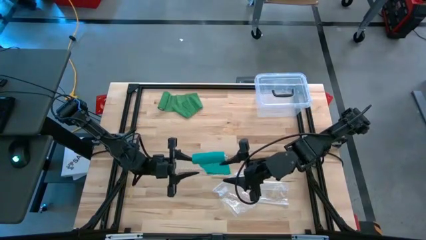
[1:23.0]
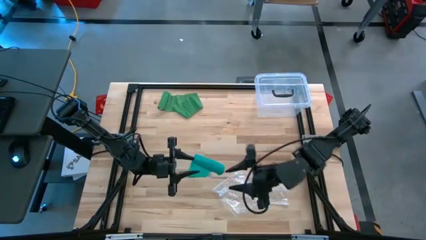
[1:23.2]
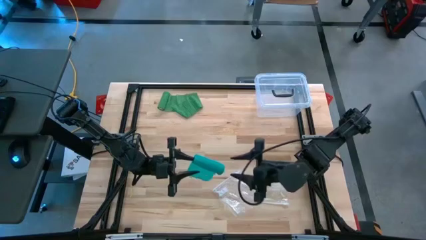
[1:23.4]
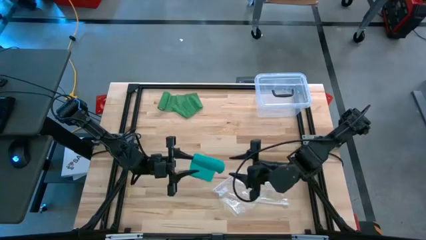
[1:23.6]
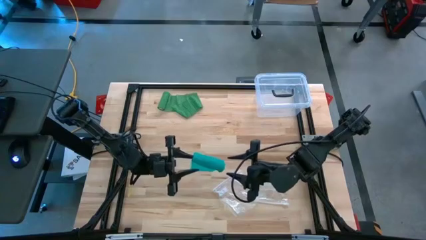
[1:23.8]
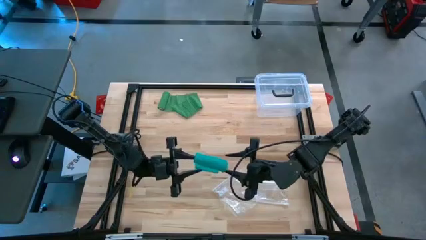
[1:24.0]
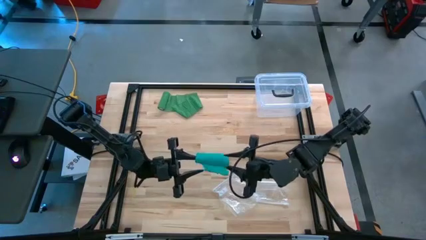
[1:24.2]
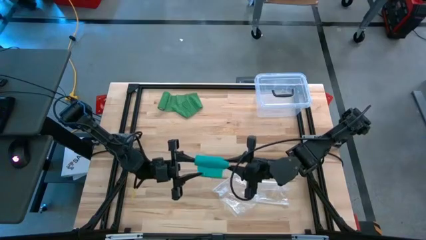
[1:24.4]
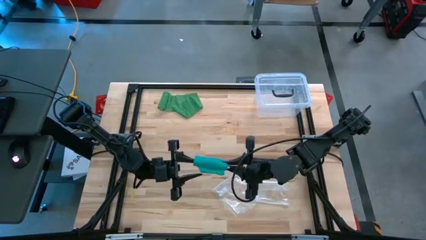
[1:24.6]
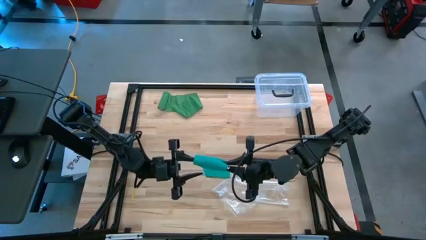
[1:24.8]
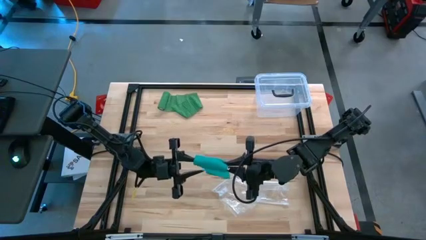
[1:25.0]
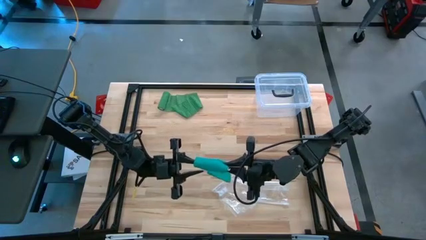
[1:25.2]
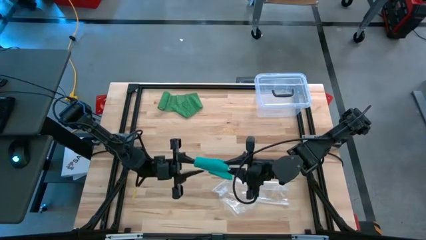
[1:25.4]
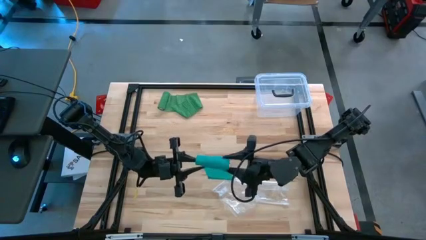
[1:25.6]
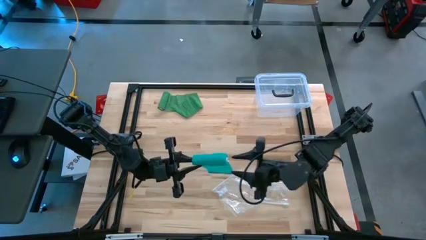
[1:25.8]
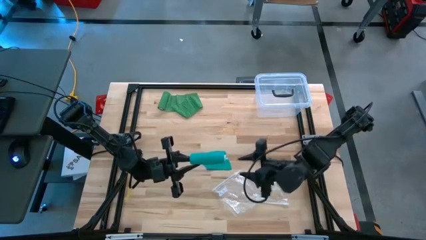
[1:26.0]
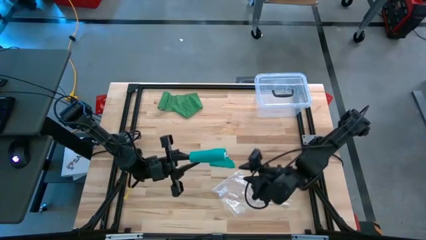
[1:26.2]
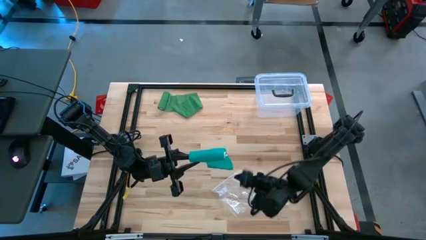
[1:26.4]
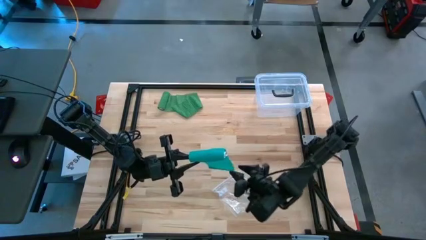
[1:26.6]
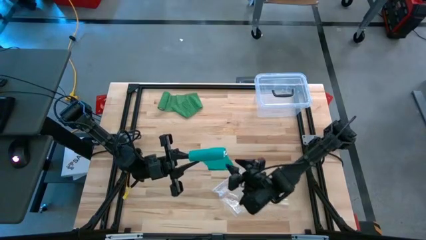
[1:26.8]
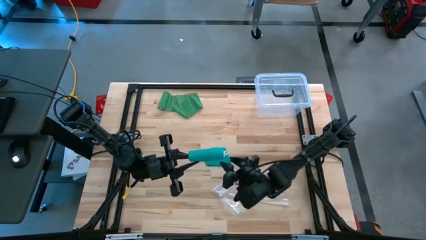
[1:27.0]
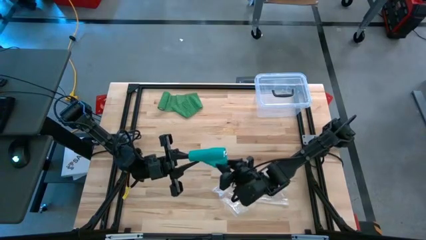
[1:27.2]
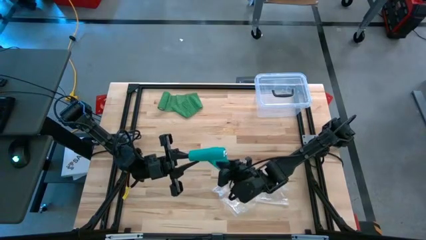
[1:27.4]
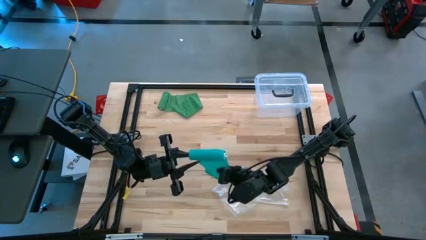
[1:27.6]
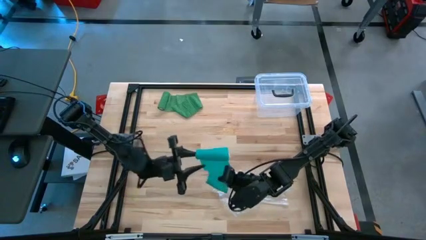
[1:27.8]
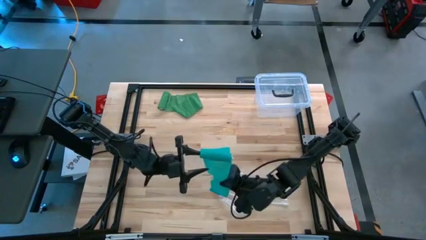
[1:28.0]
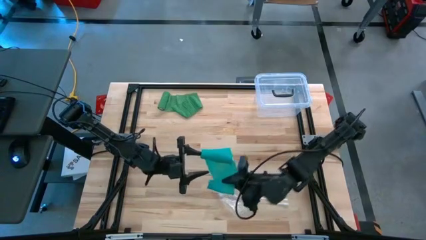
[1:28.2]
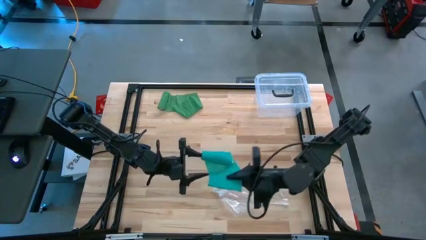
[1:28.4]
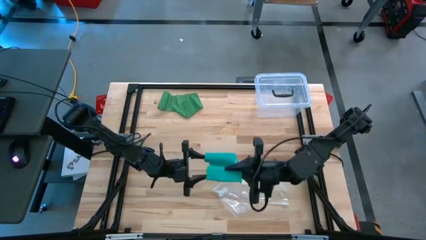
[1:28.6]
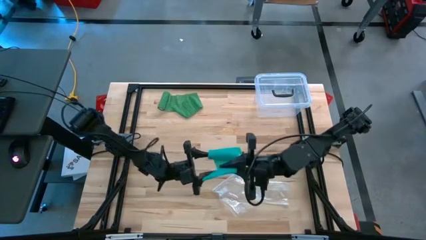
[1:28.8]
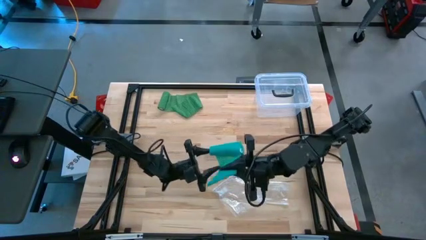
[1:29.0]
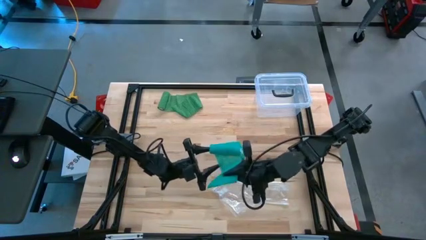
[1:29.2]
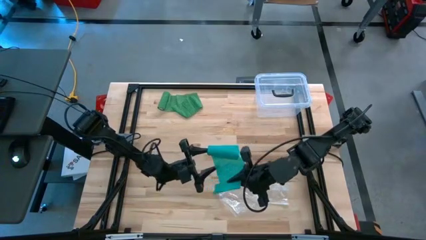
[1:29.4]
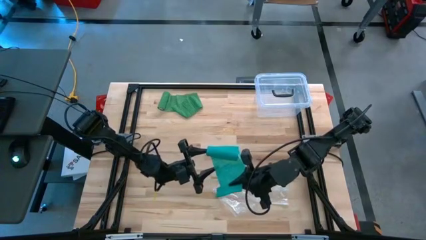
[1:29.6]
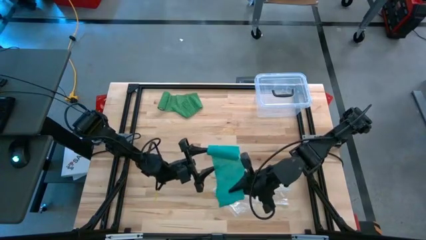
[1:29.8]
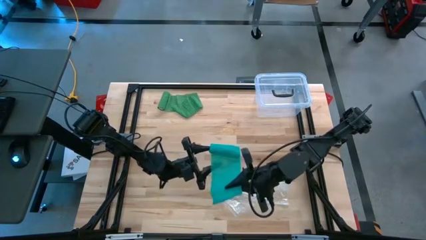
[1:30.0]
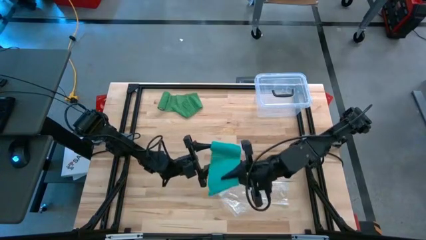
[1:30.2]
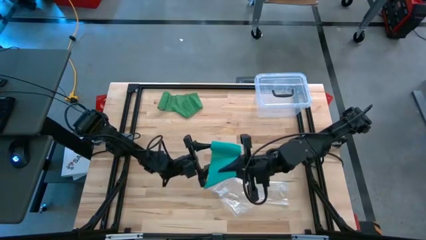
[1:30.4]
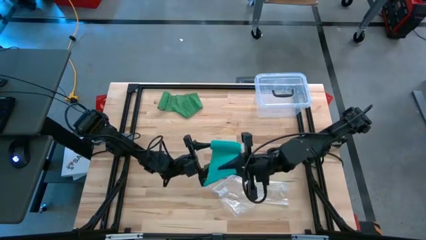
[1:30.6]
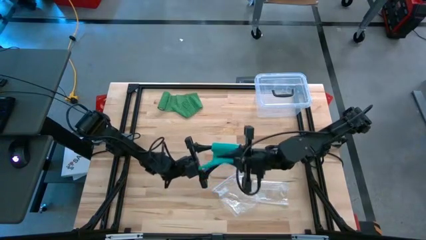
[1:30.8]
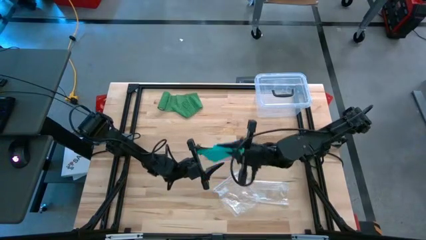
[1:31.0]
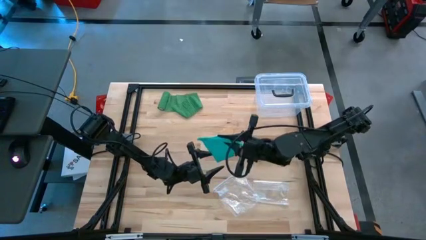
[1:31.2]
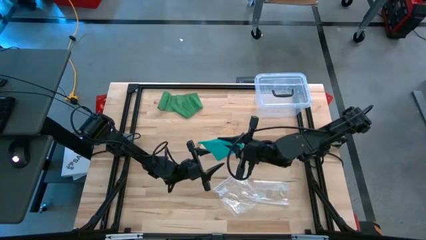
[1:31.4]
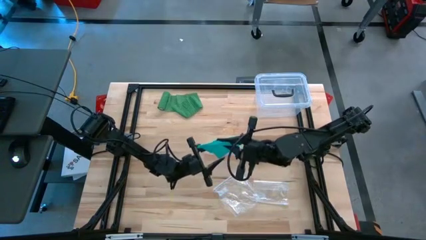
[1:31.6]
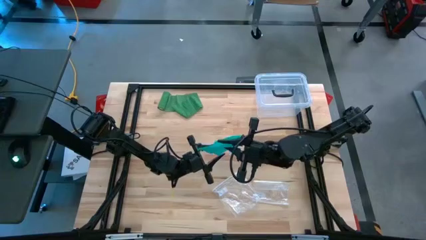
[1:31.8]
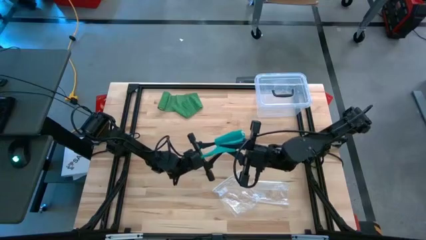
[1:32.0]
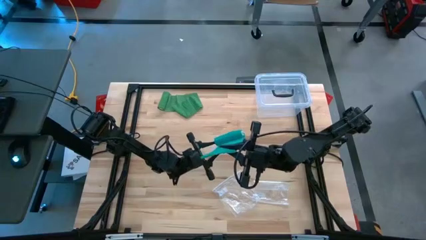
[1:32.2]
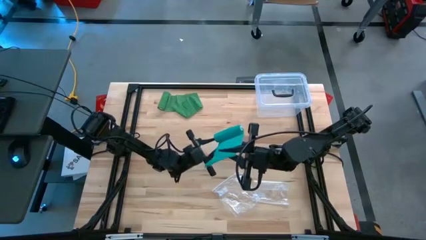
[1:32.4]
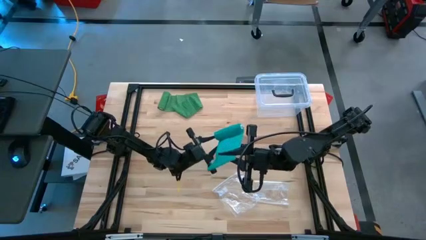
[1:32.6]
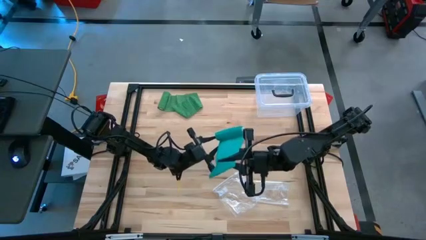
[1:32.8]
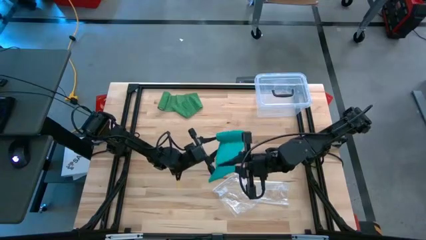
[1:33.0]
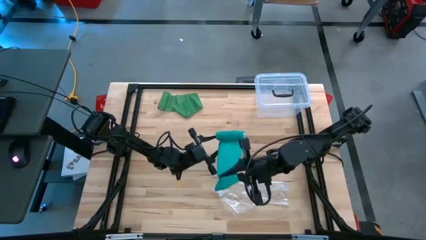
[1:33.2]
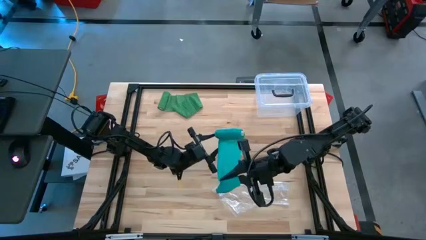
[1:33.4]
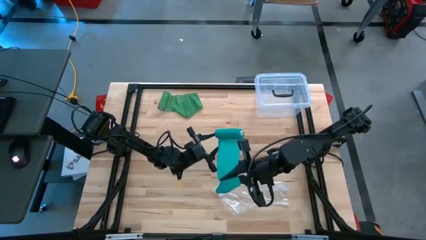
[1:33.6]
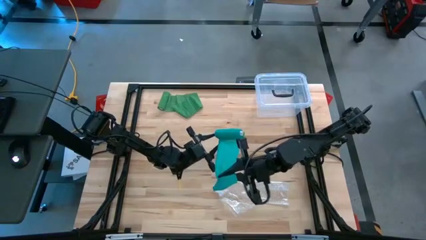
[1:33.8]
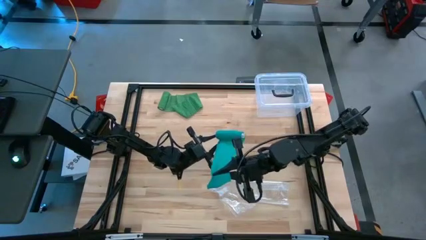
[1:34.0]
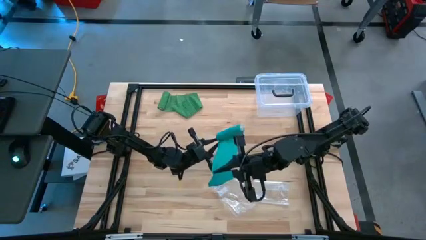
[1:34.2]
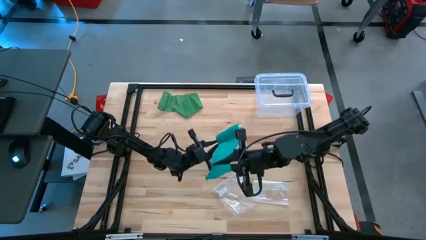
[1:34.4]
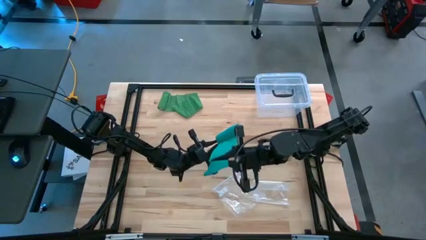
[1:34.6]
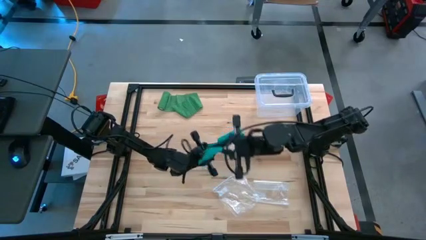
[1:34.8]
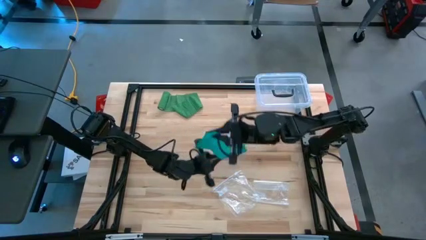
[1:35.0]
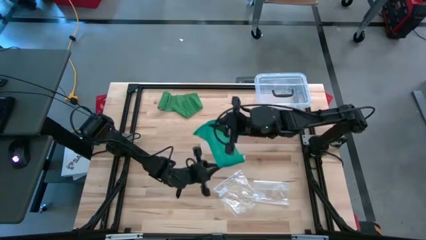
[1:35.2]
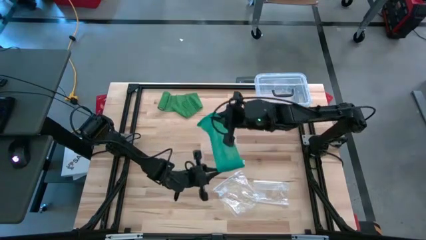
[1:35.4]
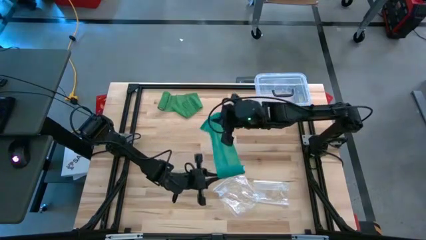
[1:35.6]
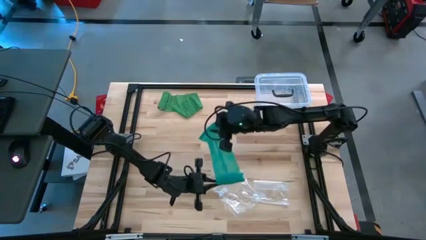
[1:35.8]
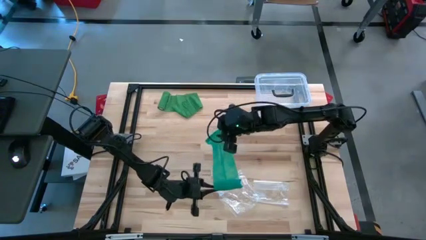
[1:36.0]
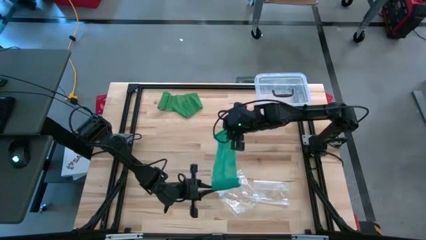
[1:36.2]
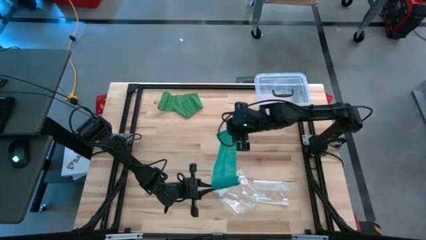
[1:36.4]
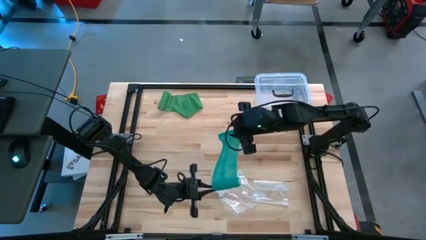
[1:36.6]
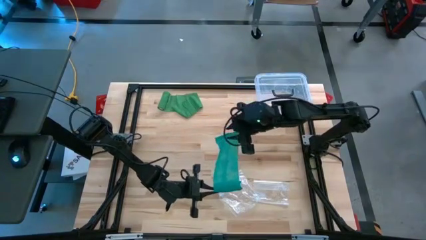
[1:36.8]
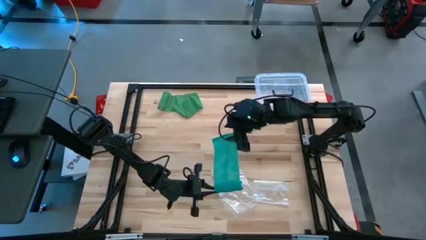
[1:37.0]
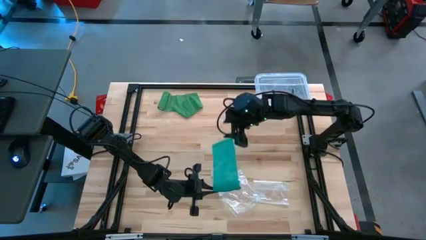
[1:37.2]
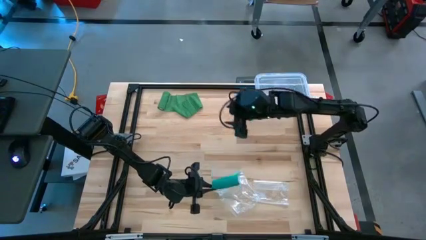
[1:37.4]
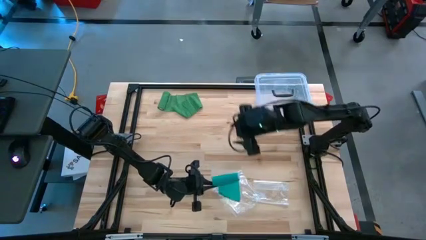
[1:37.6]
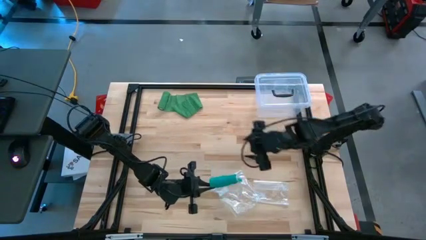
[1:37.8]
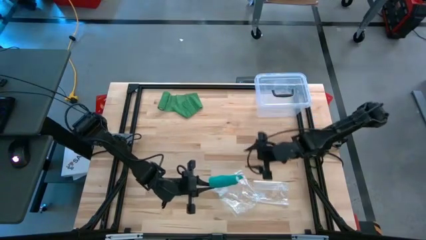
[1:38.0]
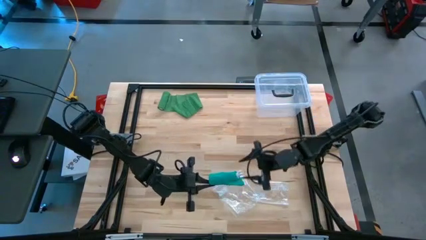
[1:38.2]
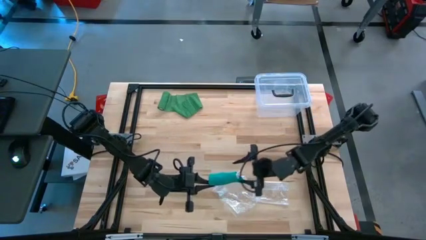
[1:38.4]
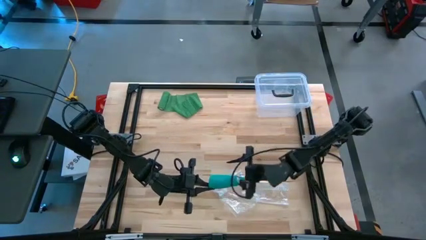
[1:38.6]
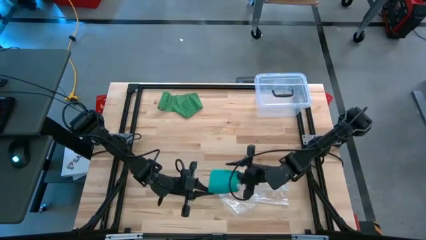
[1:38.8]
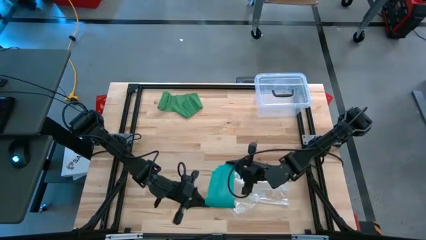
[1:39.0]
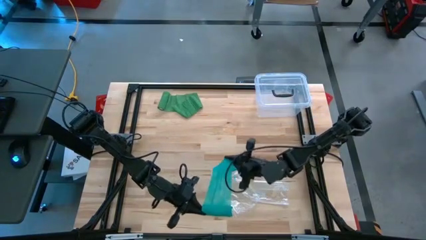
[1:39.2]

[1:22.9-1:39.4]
Task: Roll bandage
Roll the blue bandage

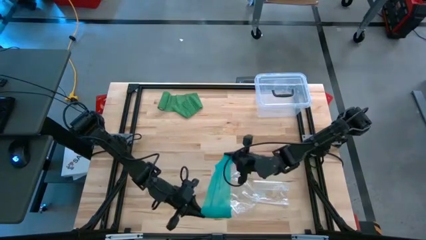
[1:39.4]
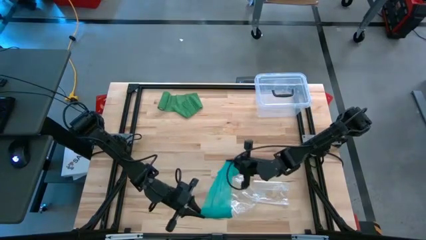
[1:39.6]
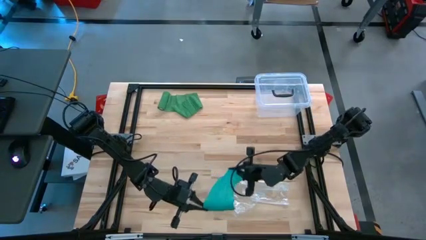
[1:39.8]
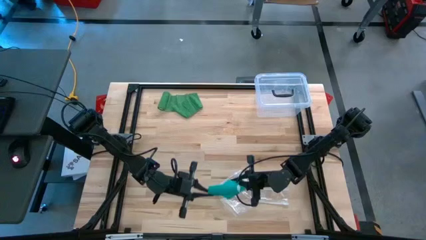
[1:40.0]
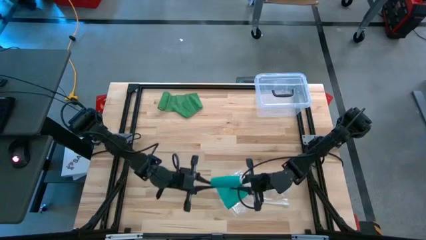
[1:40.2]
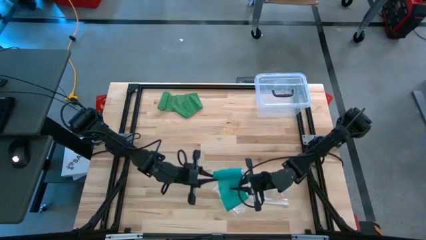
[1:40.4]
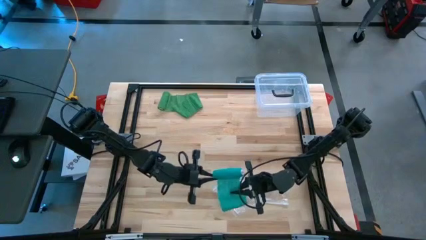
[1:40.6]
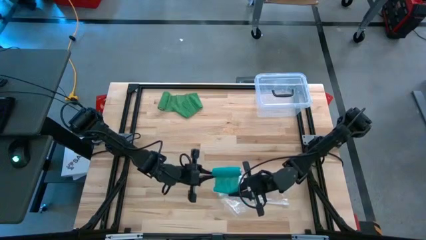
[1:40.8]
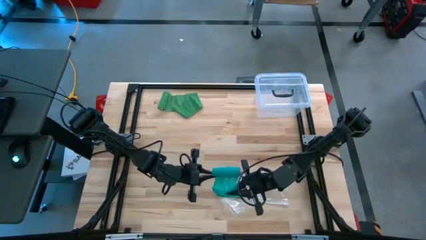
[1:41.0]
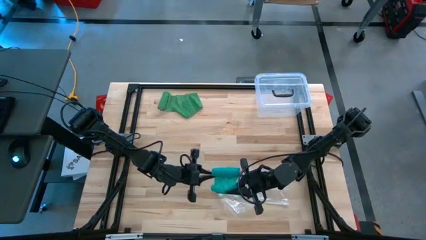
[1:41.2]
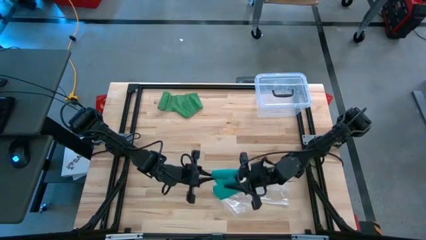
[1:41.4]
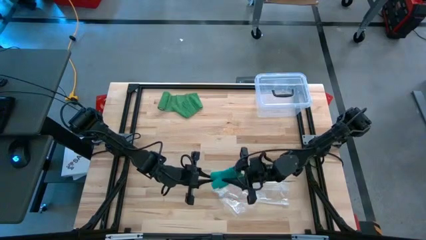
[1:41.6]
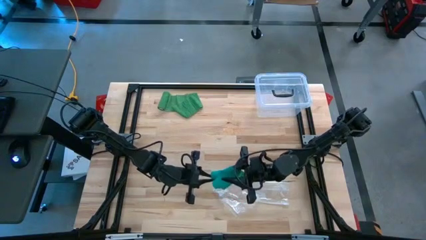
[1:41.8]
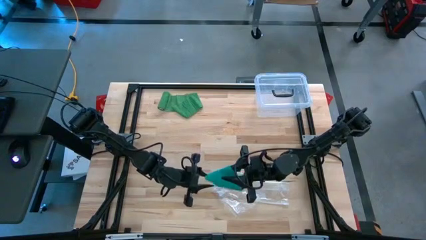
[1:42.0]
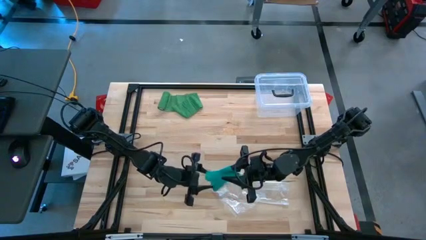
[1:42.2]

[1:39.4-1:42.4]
Roll the blue bandage
